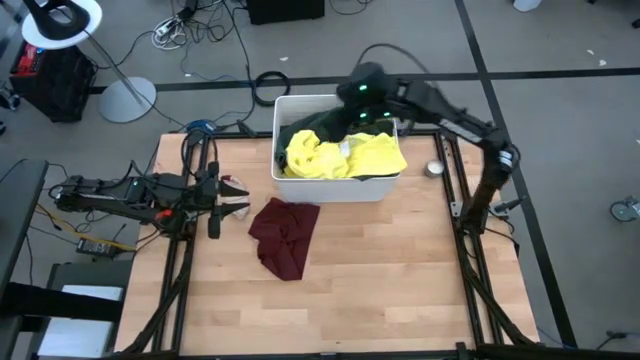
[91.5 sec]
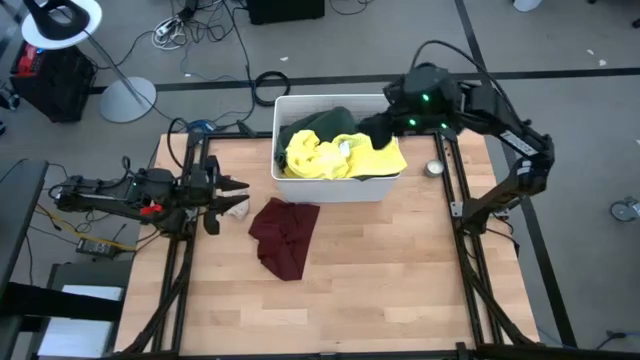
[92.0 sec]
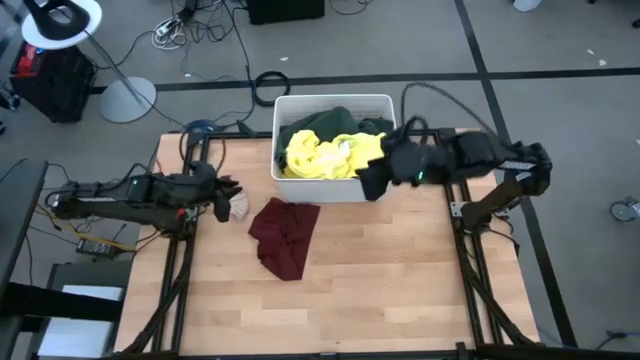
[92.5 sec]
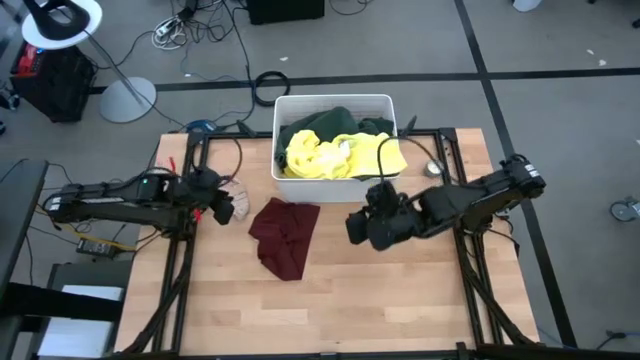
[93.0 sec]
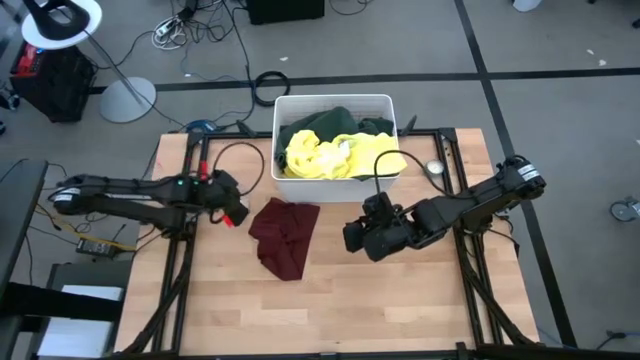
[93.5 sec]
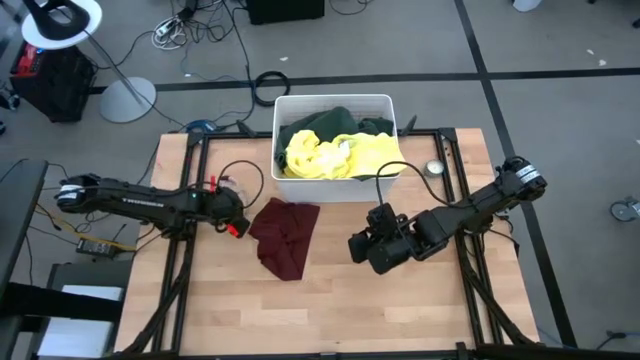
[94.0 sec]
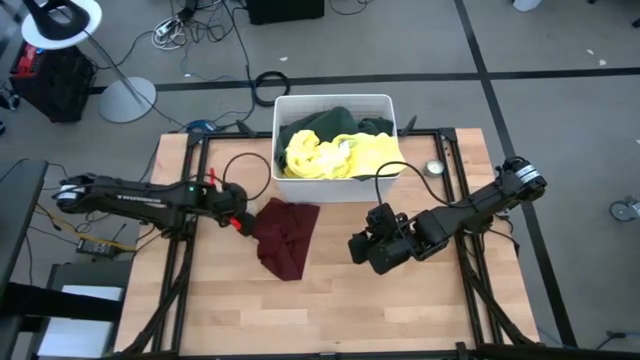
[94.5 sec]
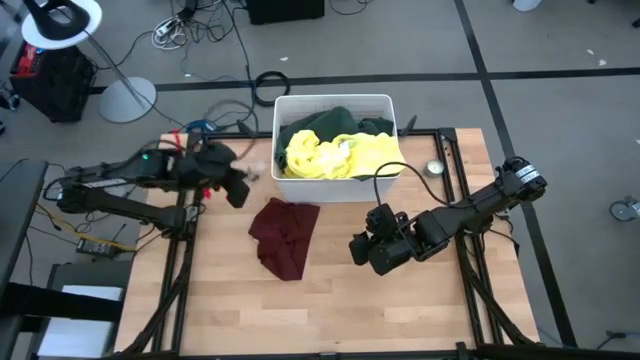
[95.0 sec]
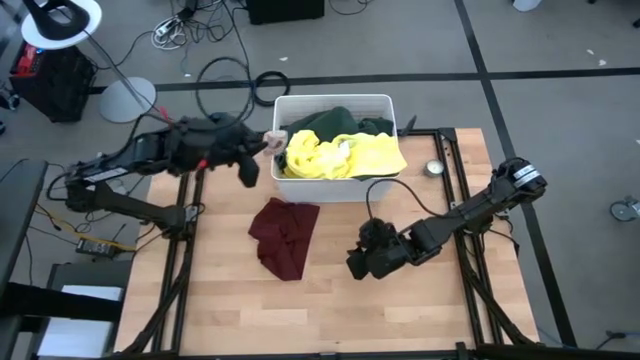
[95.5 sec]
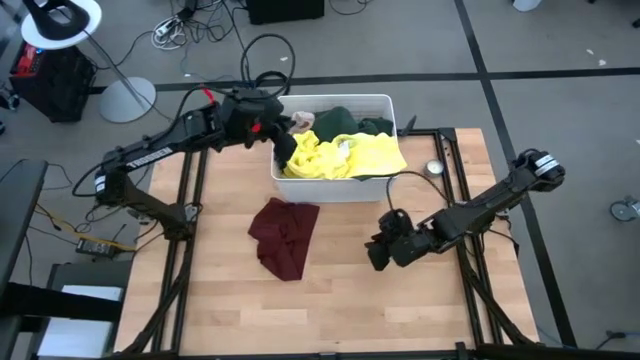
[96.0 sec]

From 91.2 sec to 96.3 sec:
Task: Sort clothes
Put the brown sock into the white bin

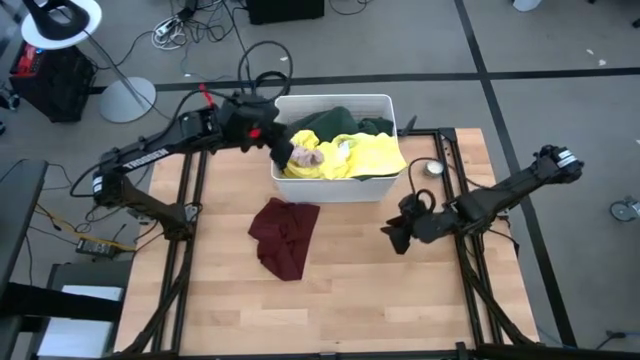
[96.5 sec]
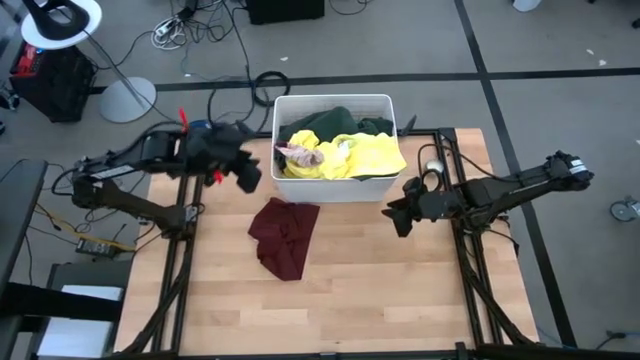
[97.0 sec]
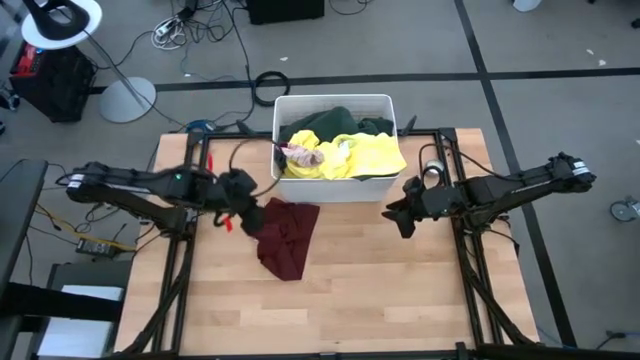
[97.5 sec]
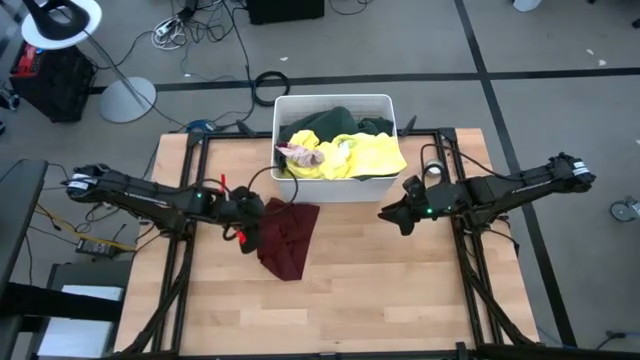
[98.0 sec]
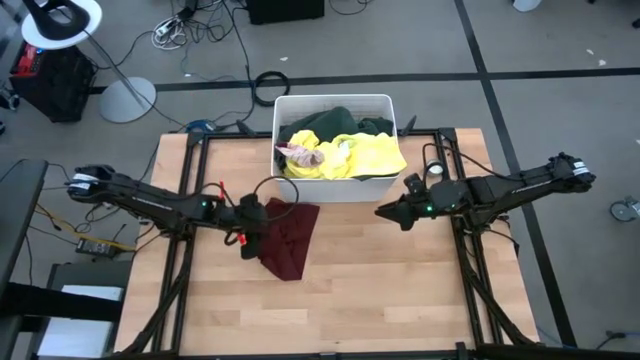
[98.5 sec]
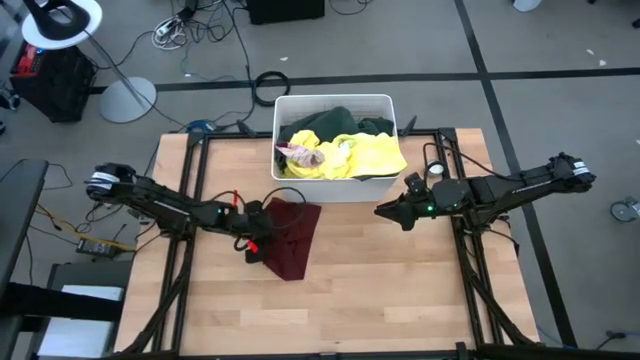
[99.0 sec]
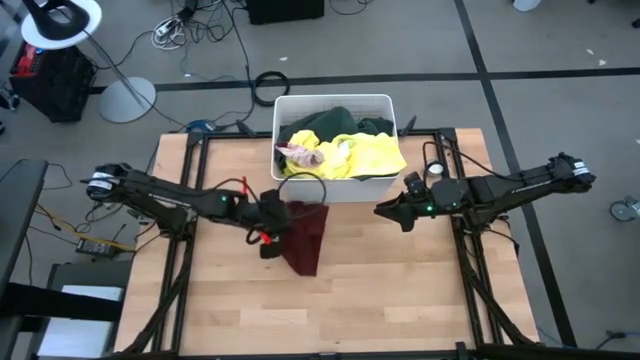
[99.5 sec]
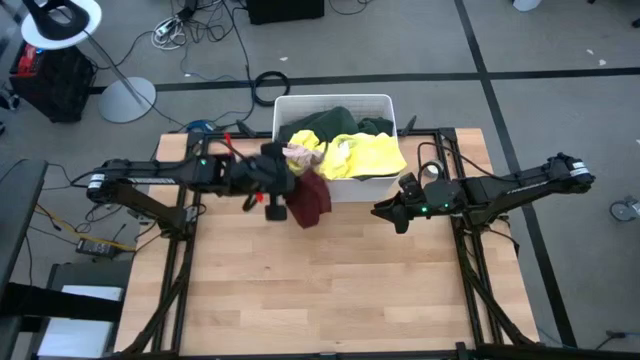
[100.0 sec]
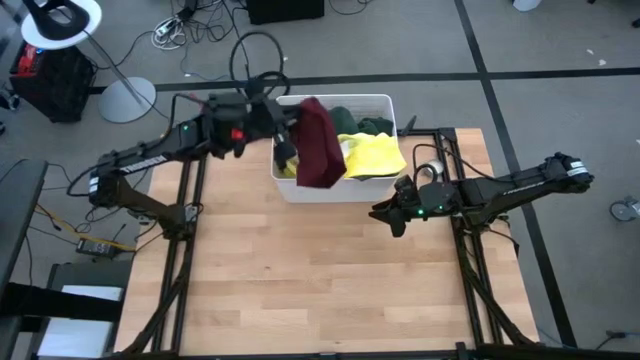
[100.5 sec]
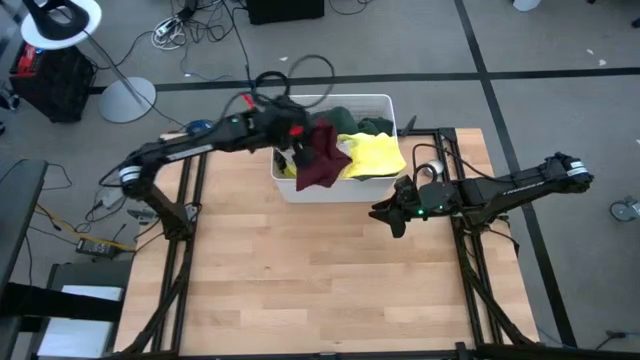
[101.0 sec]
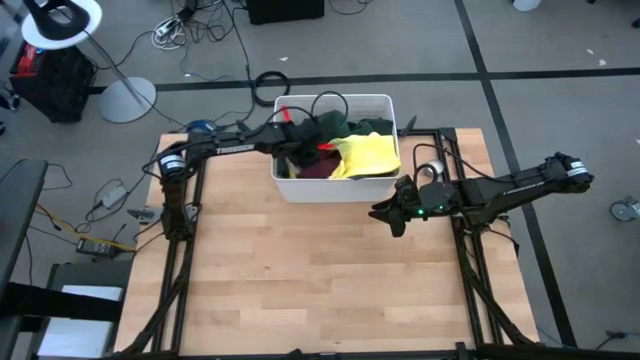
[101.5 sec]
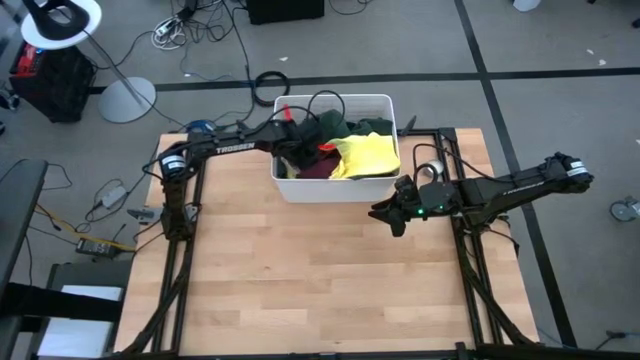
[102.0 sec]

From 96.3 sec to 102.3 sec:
Put the red boxer shorts into the white bin

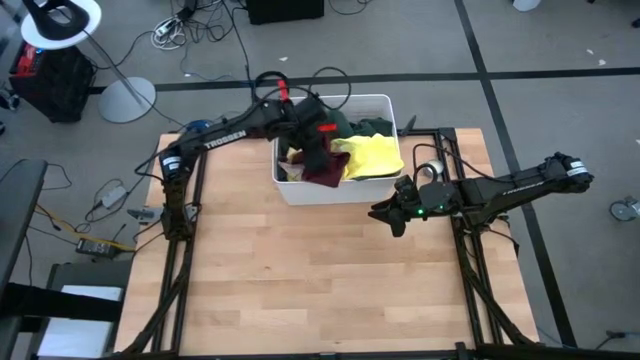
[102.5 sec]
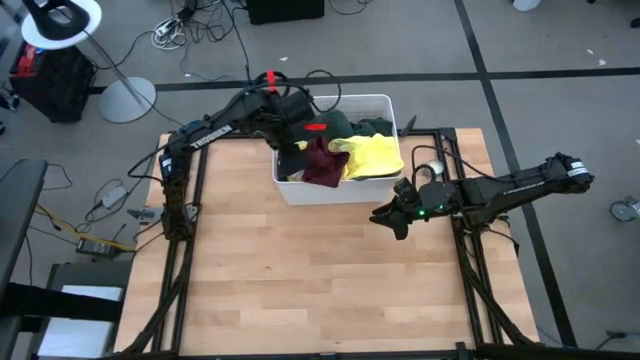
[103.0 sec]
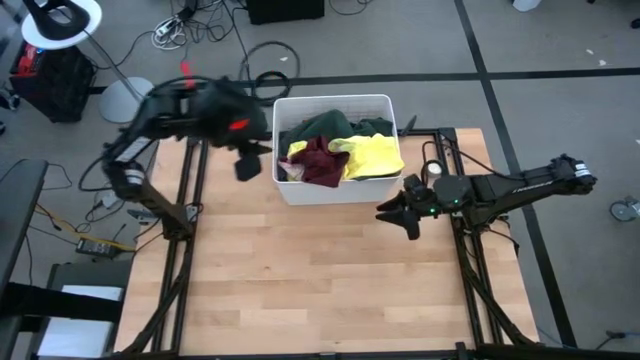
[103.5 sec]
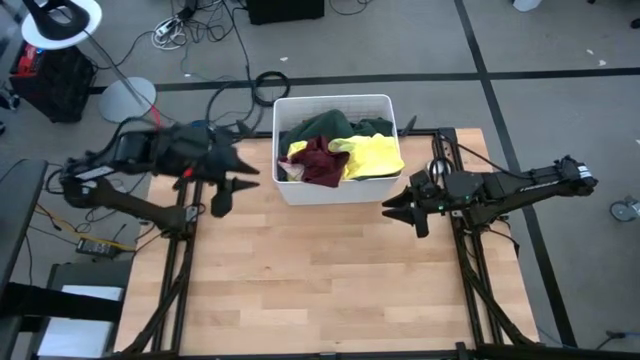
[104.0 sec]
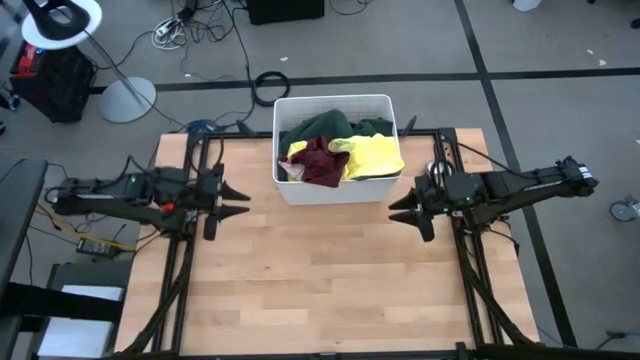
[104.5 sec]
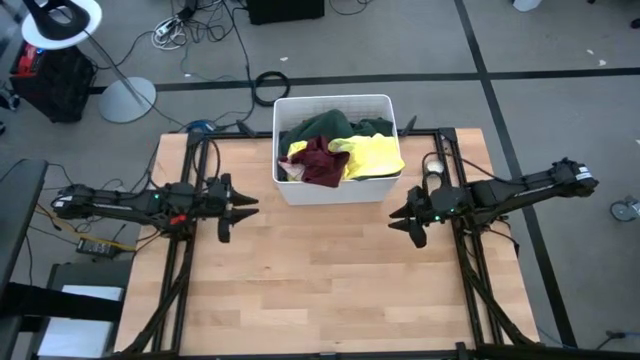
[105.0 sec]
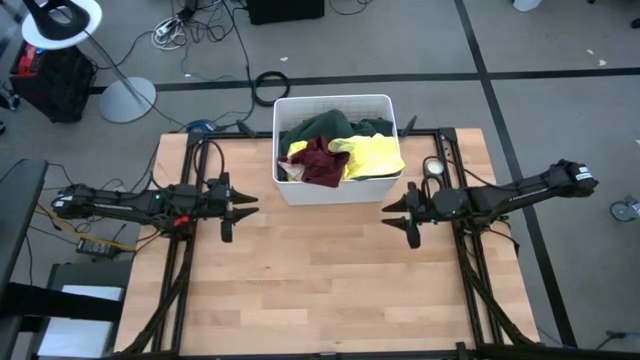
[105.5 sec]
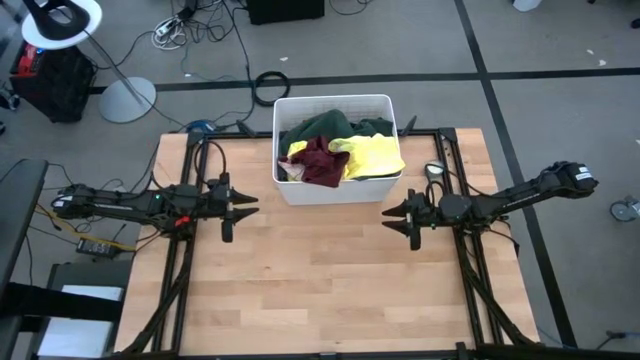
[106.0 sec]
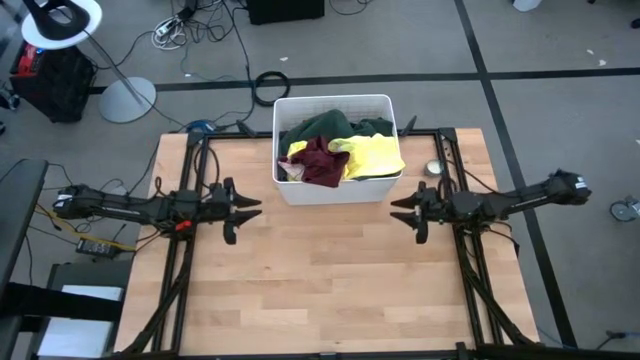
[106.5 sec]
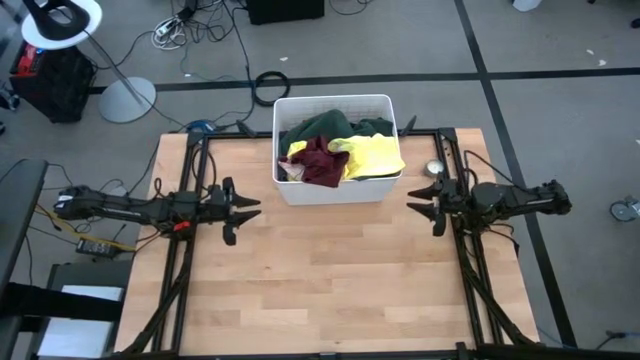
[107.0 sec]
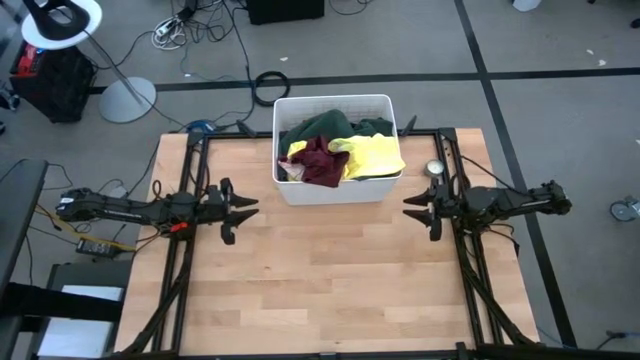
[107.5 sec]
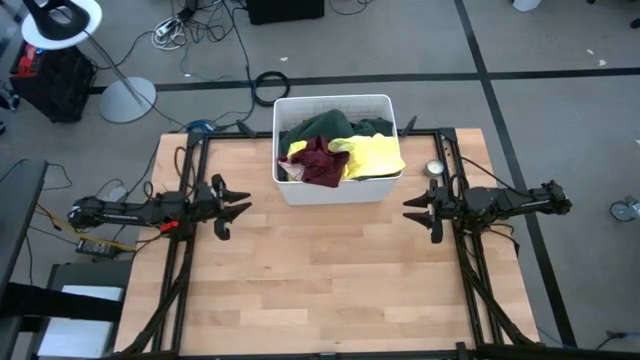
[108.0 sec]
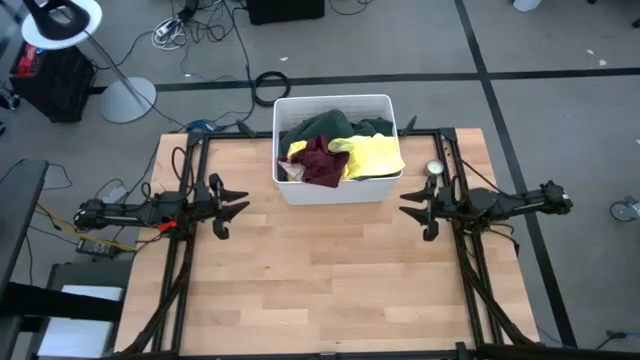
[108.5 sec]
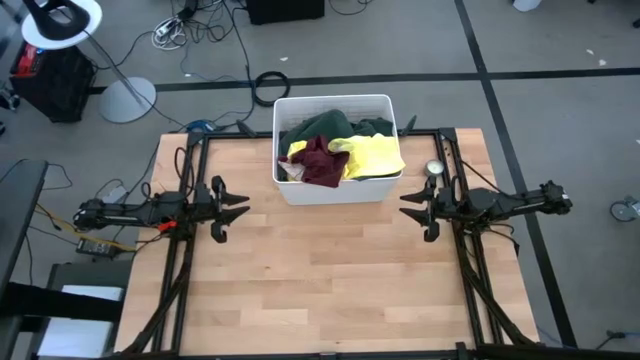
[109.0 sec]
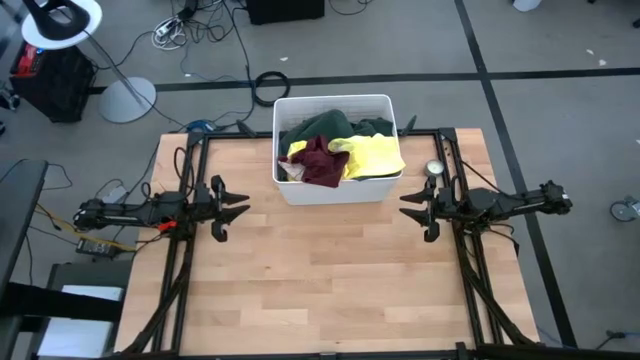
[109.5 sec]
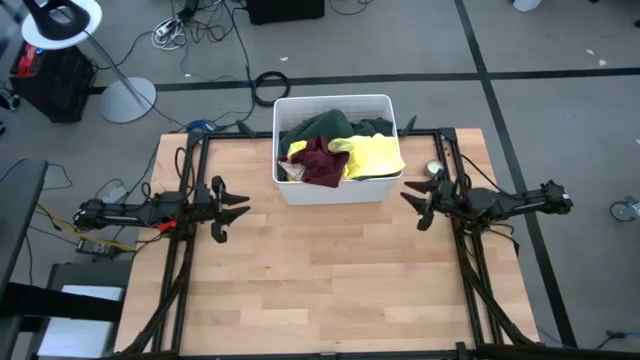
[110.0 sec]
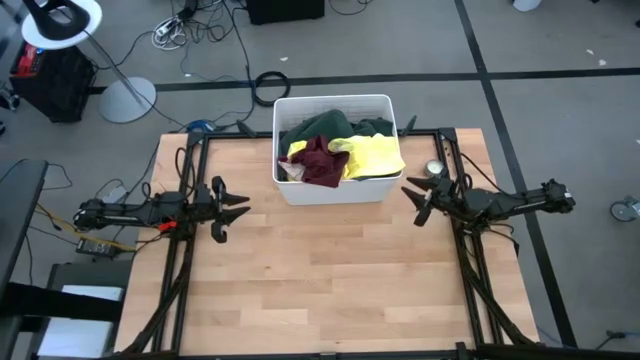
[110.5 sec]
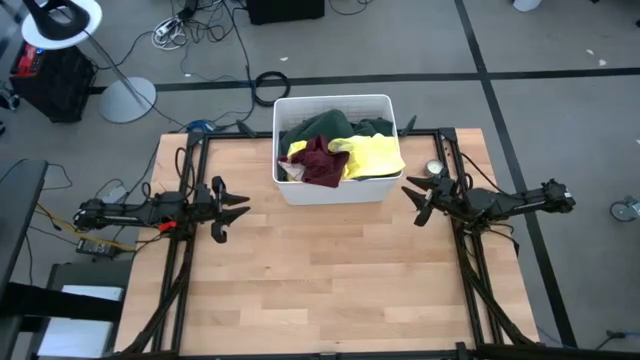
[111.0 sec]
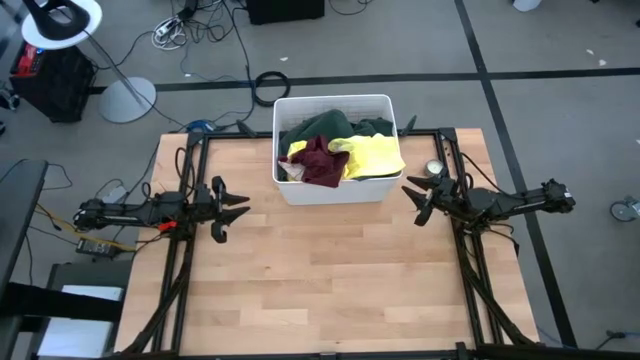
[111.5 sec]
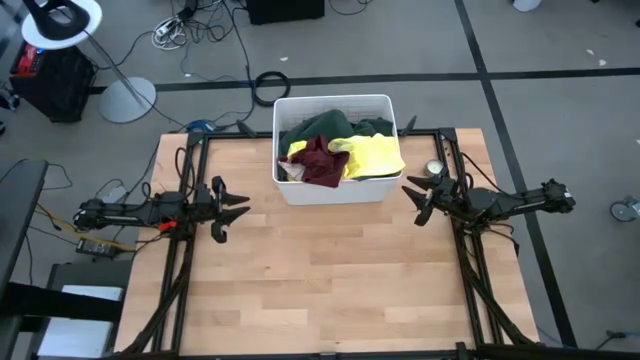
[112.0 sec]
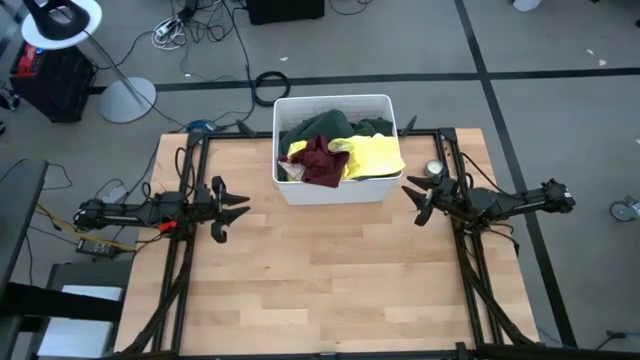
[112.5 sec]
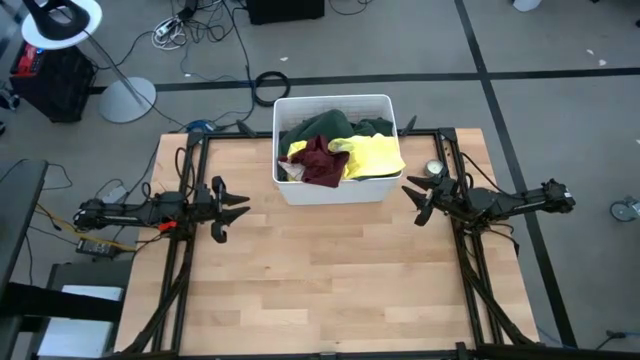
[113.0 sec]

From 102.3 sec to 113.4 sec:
Return to home position
